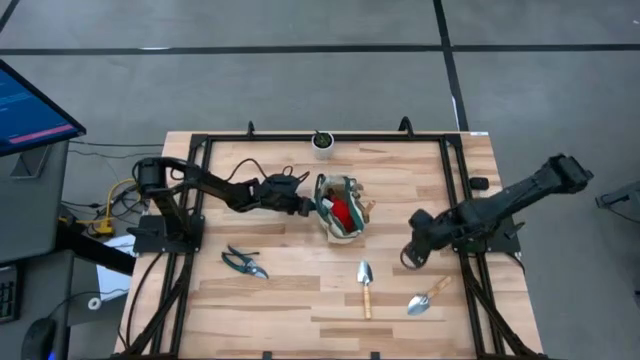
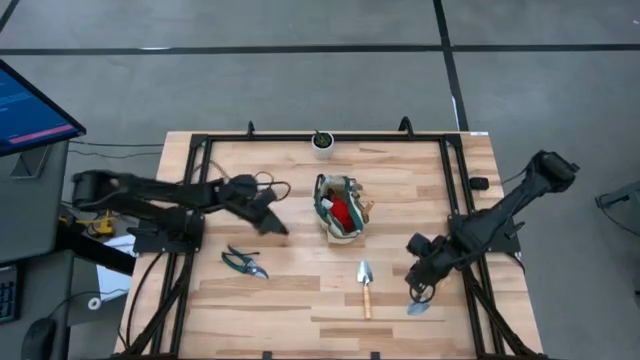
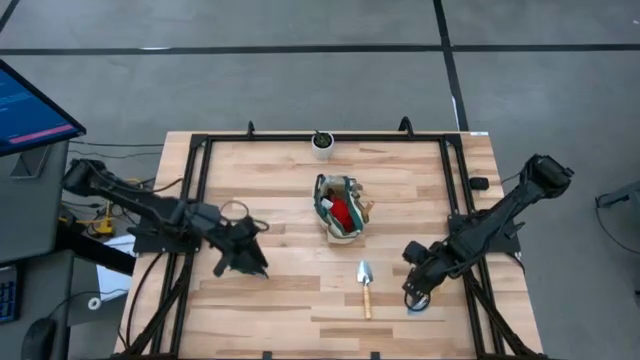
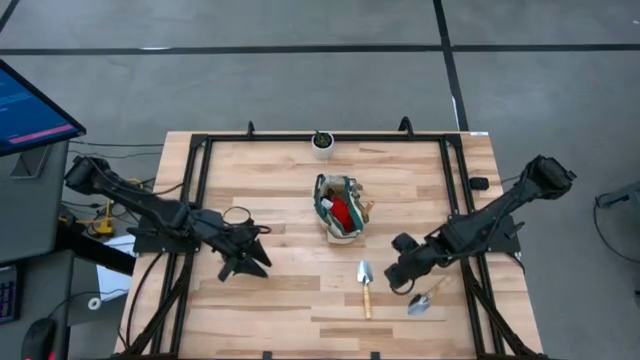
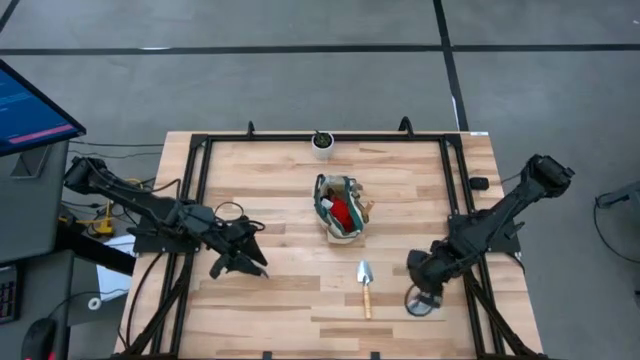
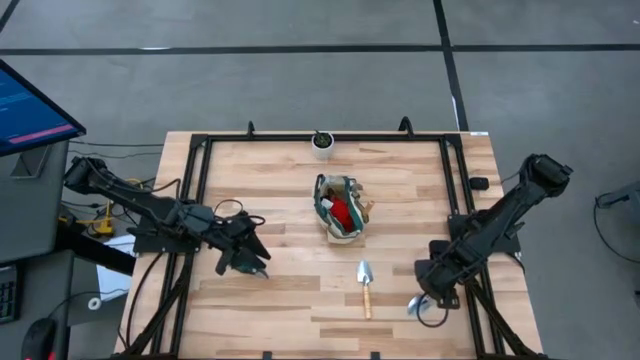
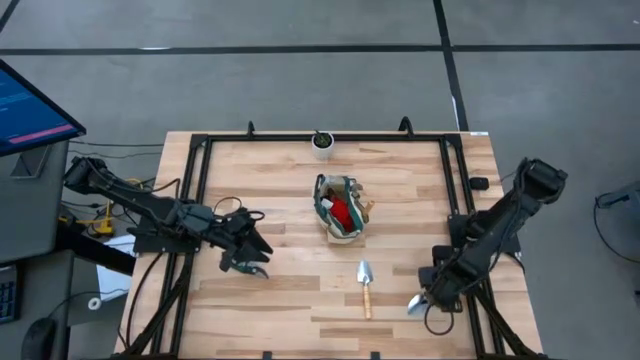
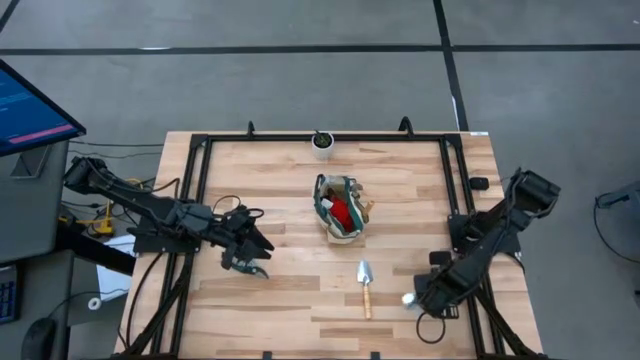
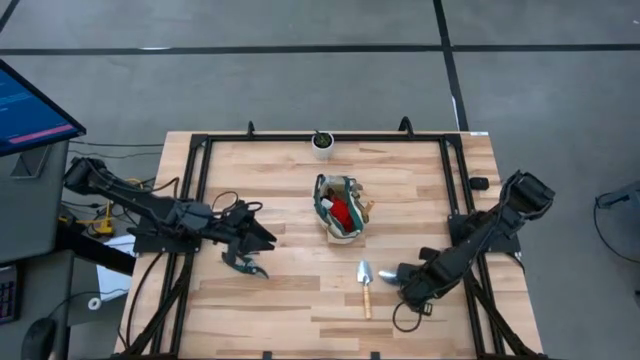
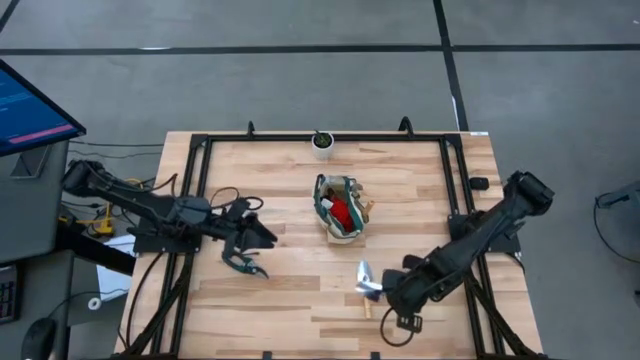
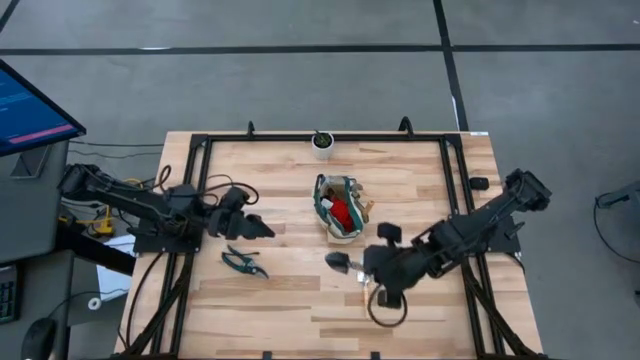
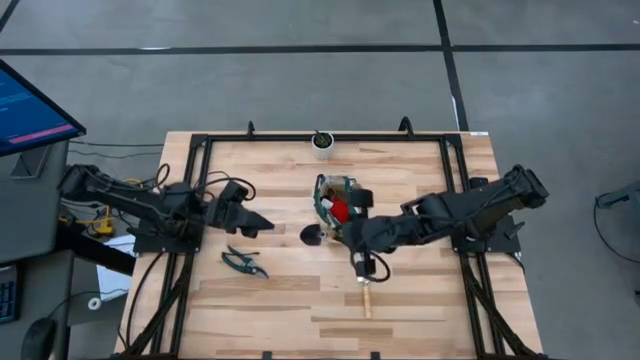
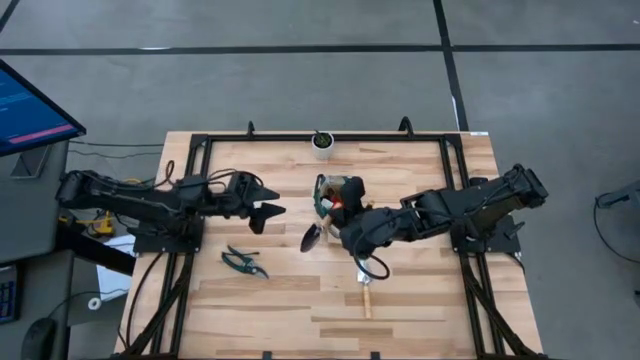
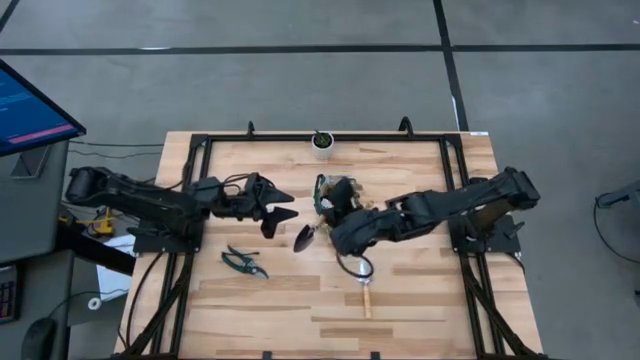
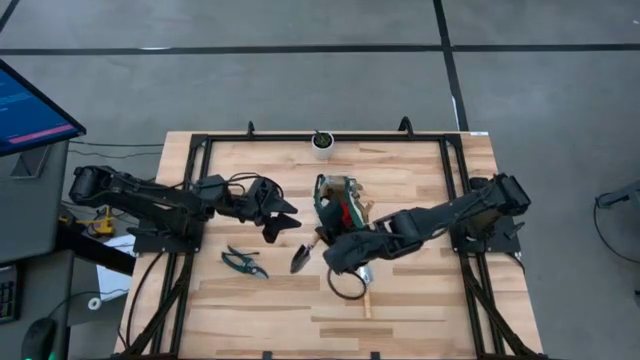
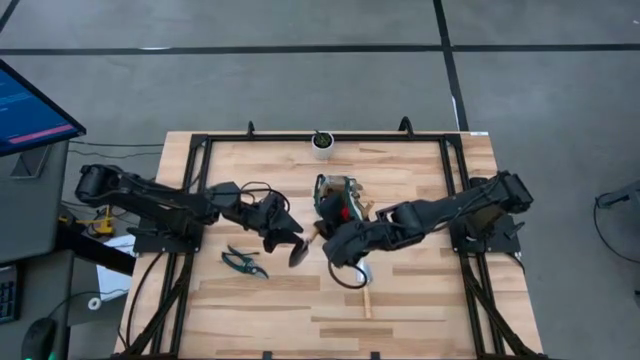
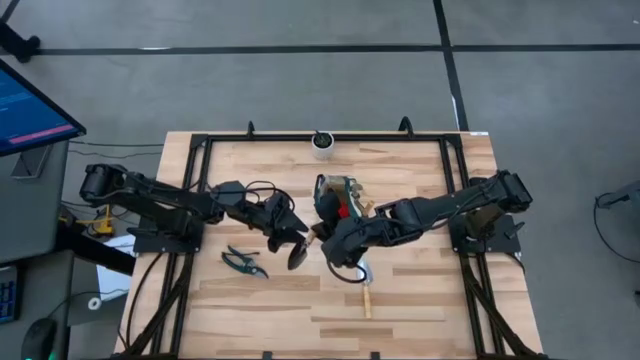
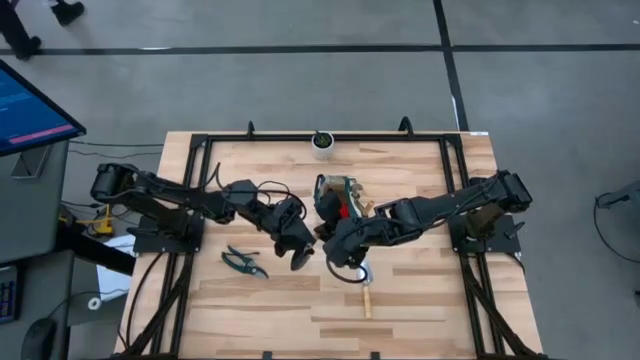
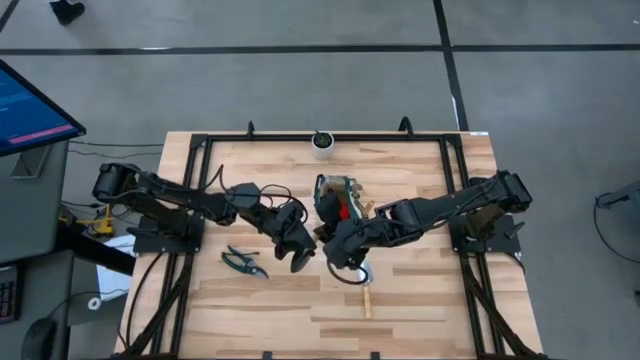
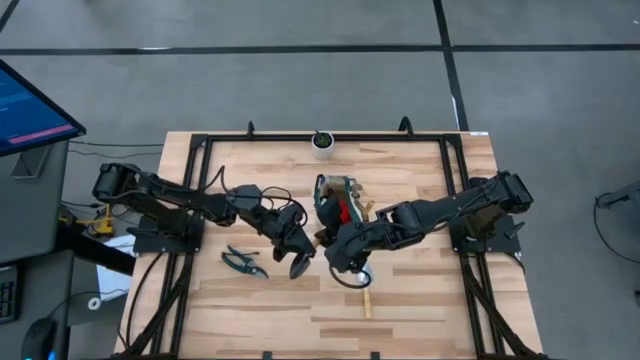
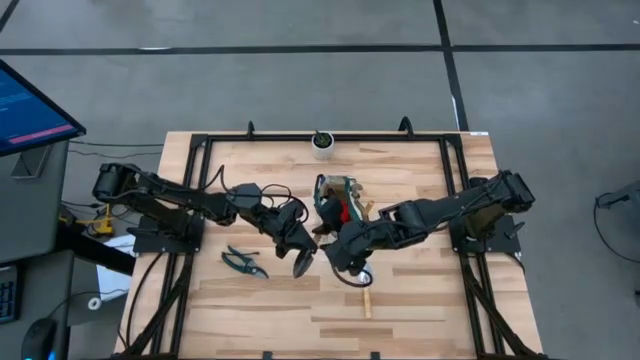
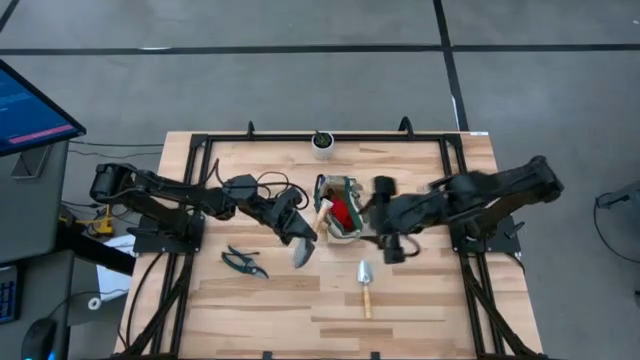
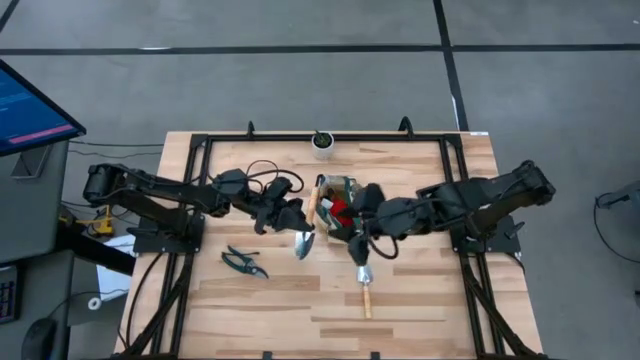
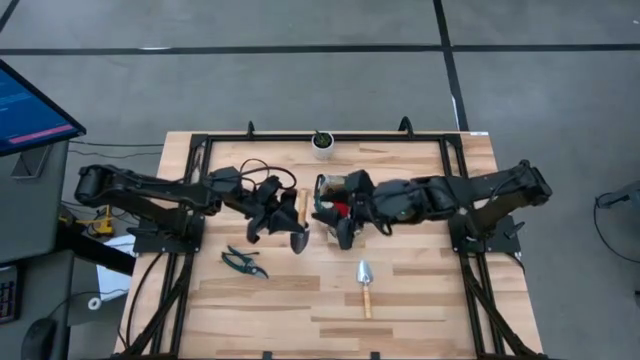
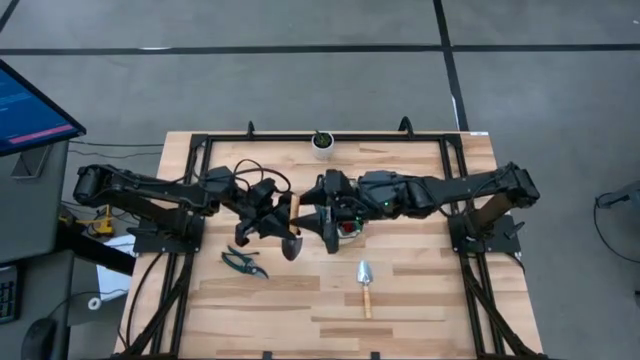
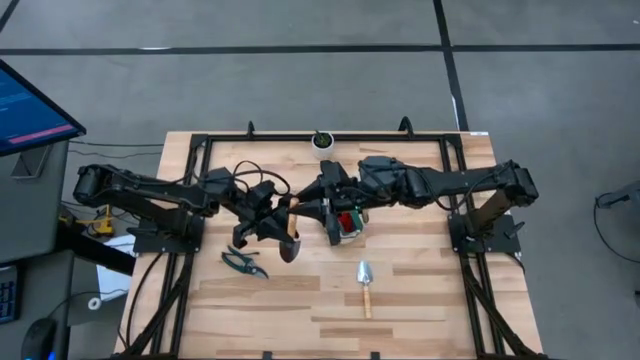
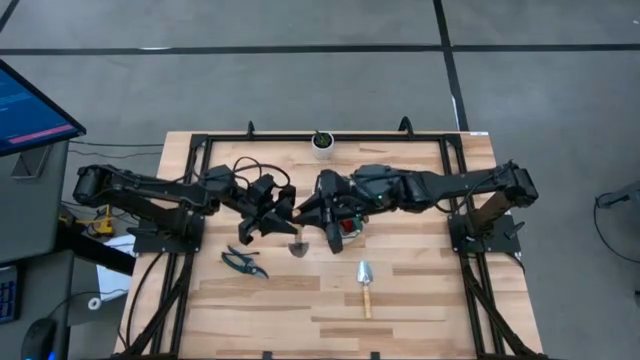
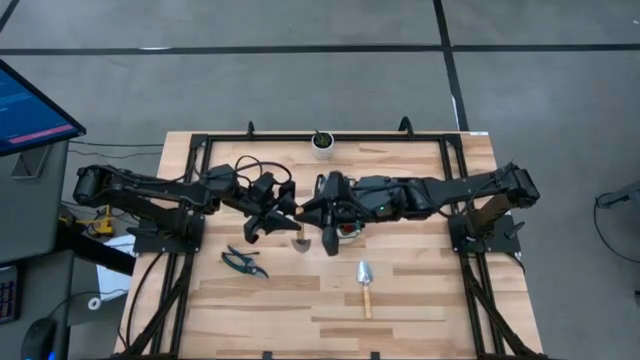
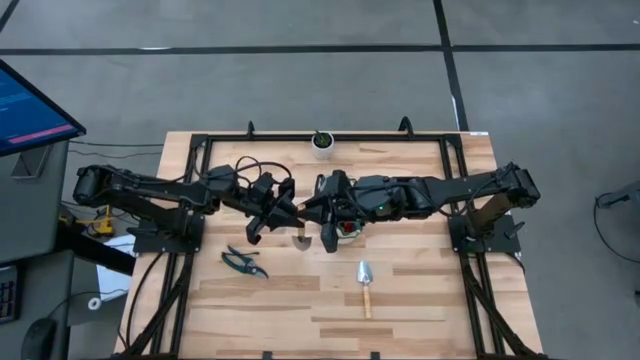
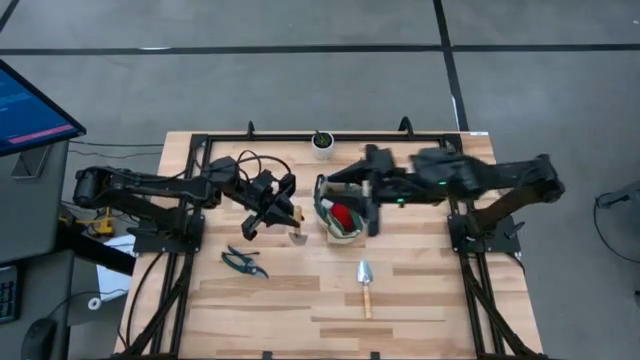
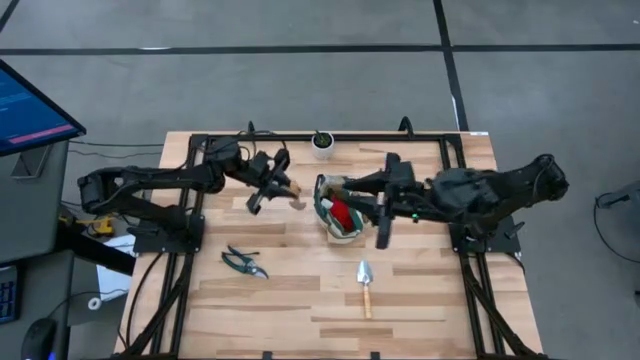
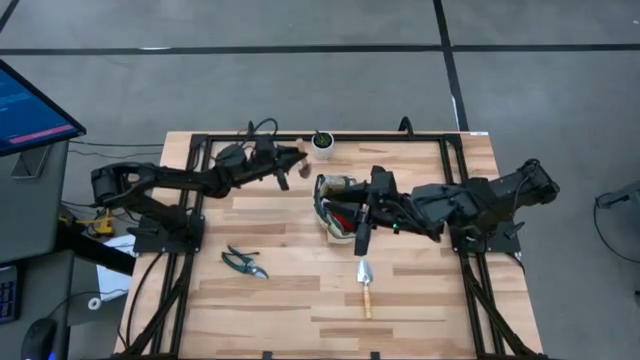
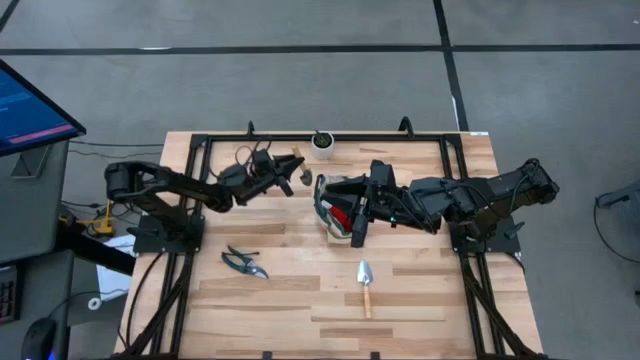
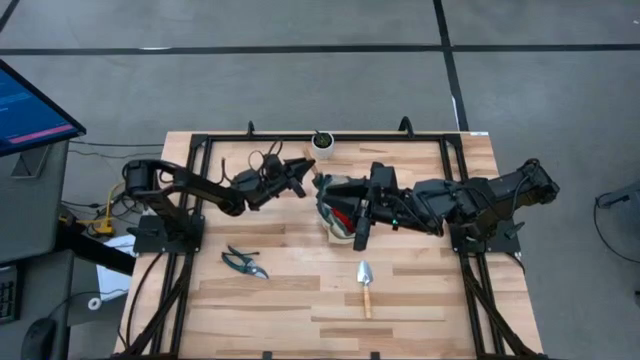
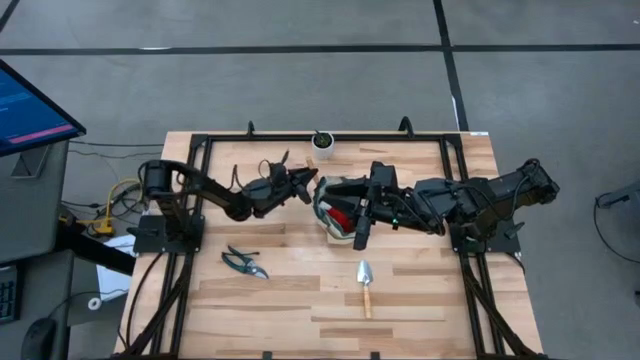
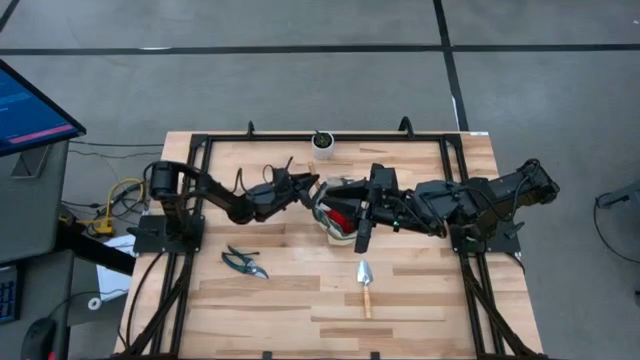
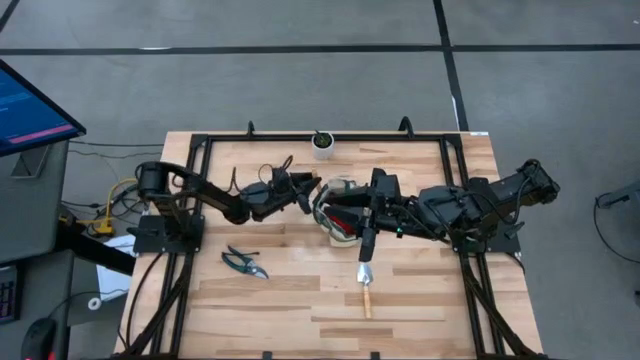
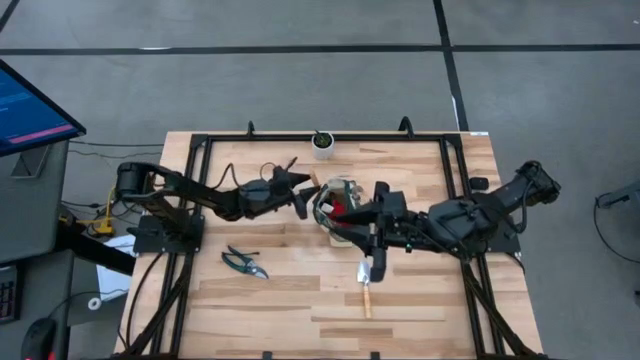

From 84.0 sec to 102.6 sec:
Task: Pick & Place Garden tools in Gardening bag
Put the brown trowel into the green gardening bag

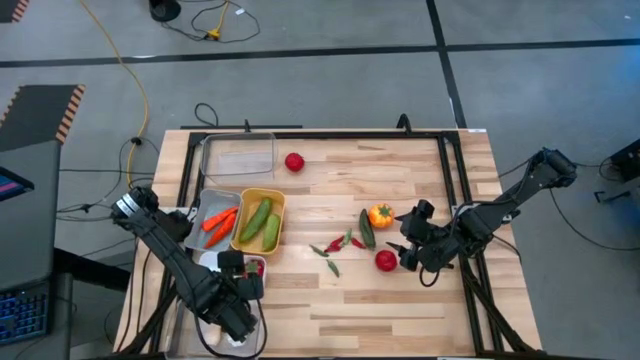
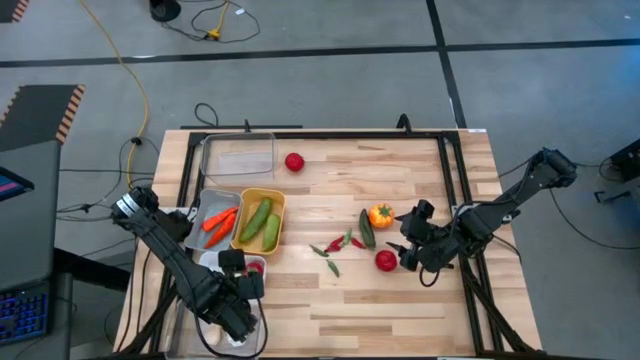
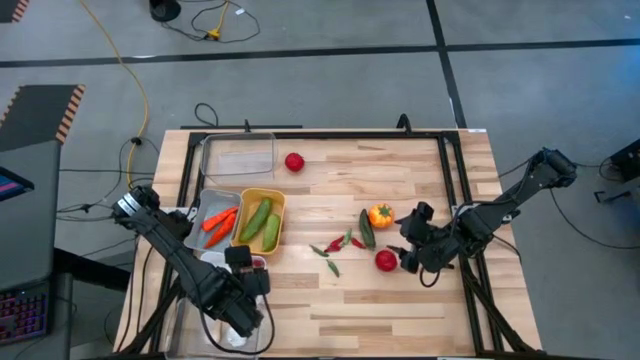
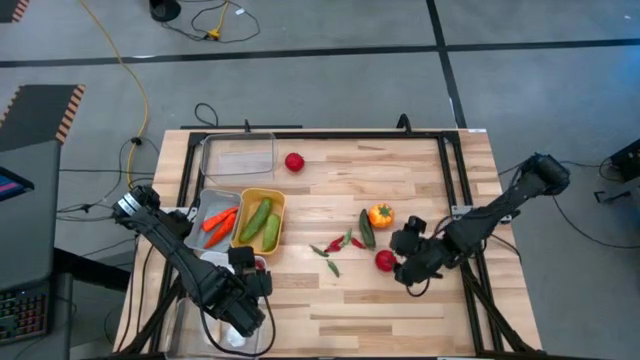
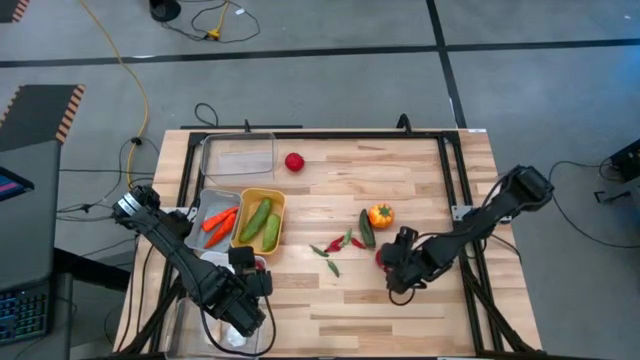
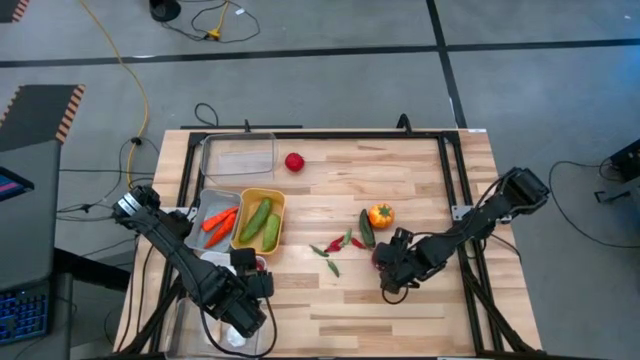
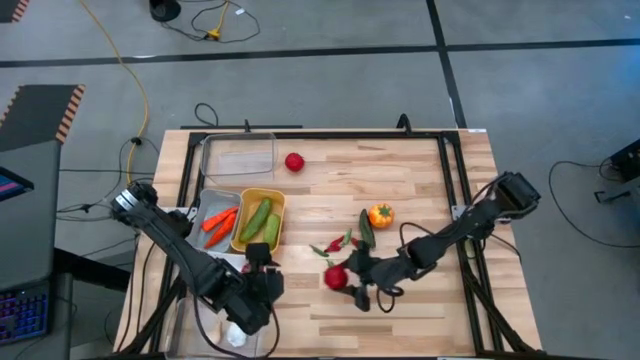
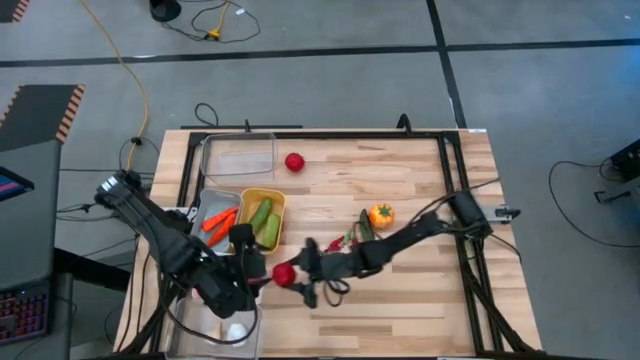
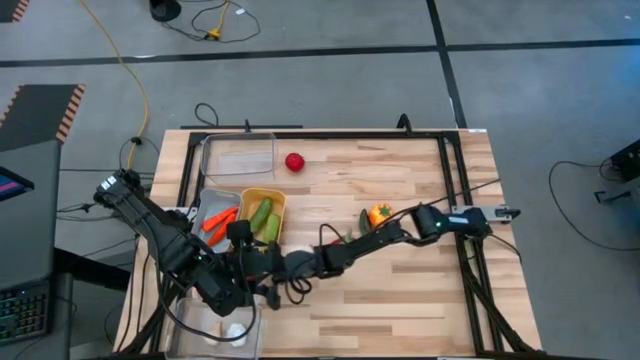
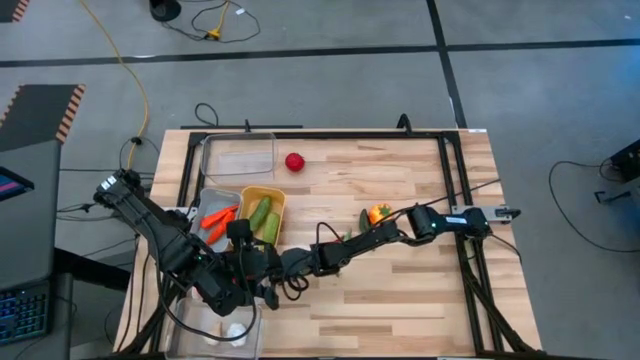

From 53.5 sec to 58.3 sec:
Task: Sort produce into baskets
Put the bottom right tomato into the white bin
